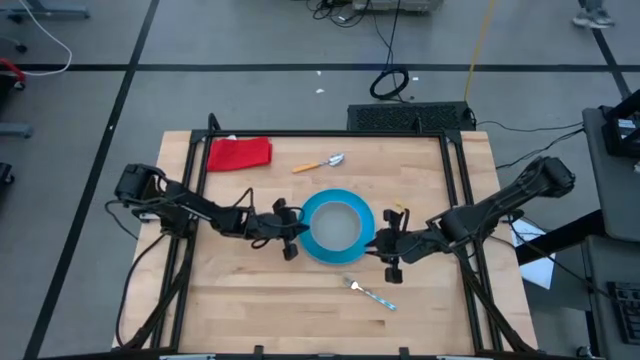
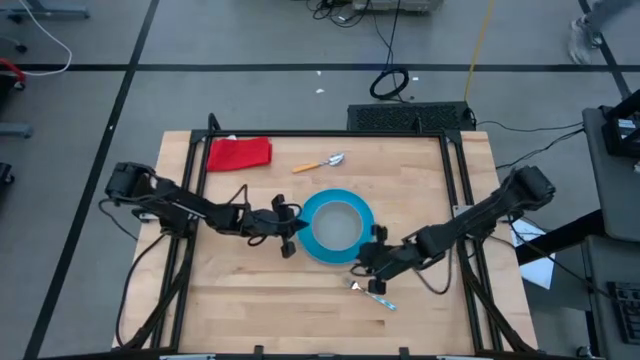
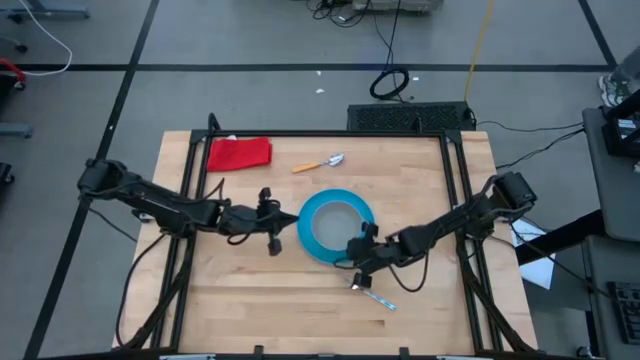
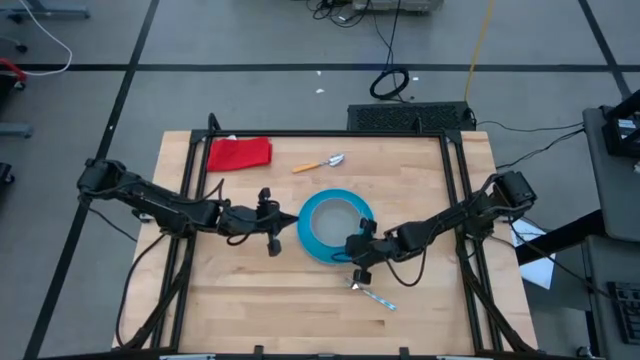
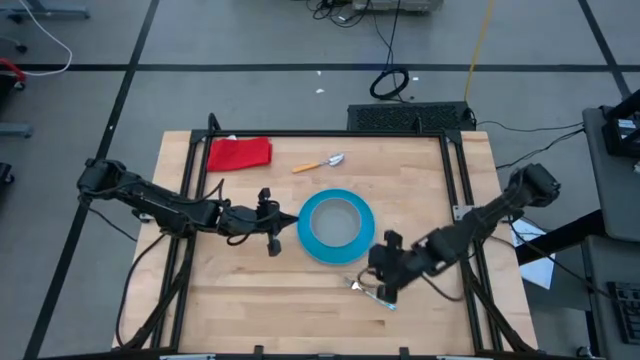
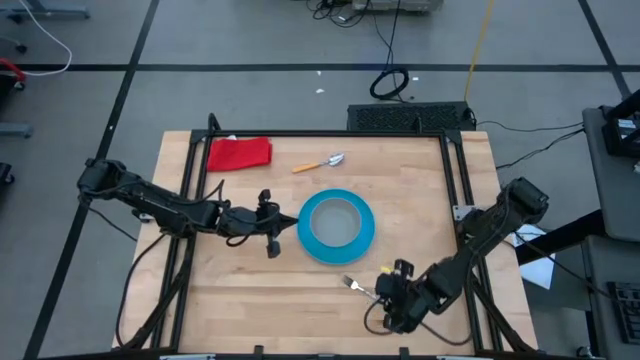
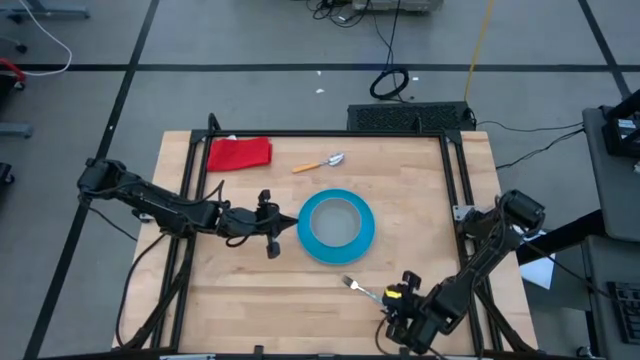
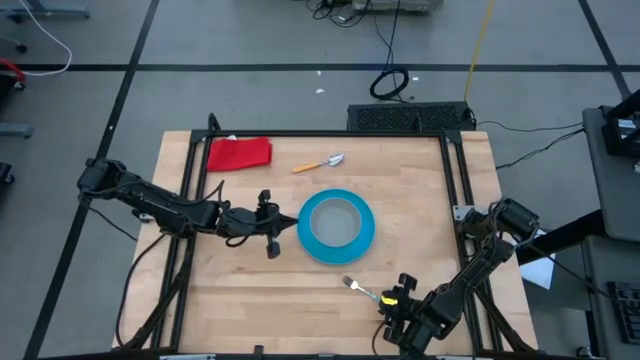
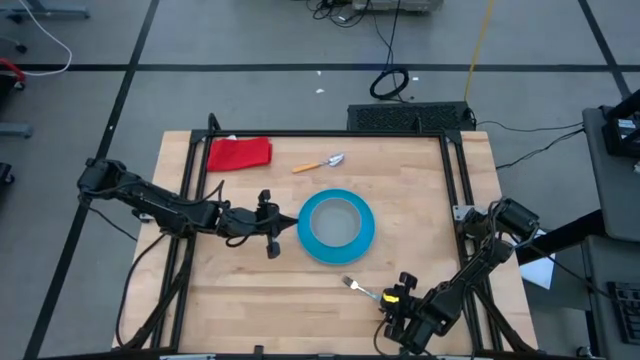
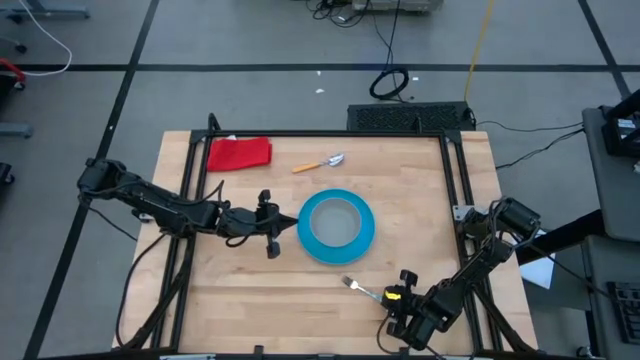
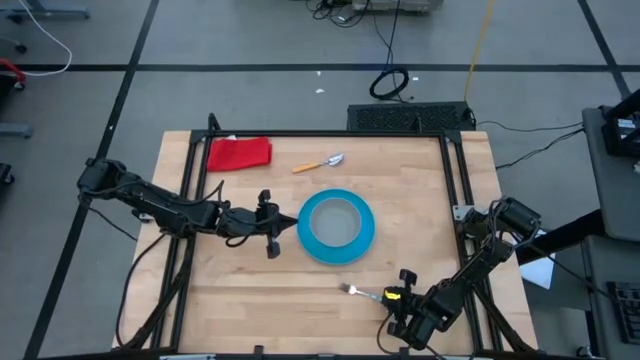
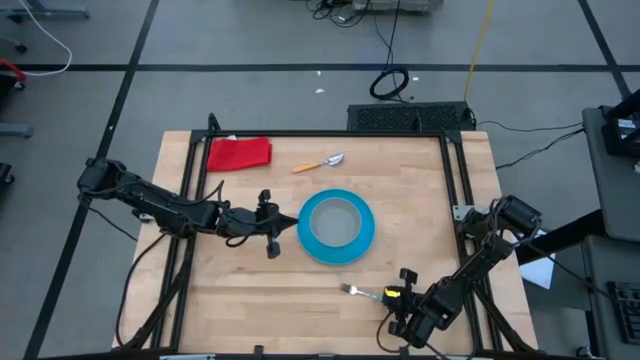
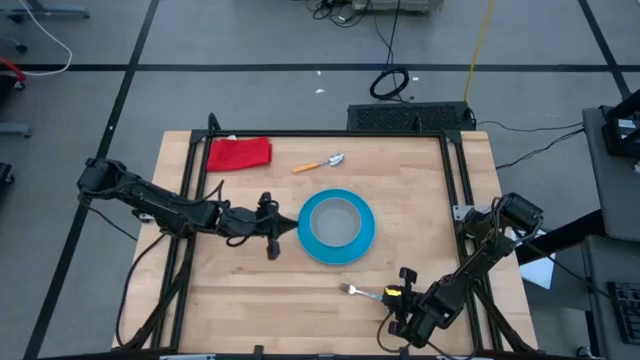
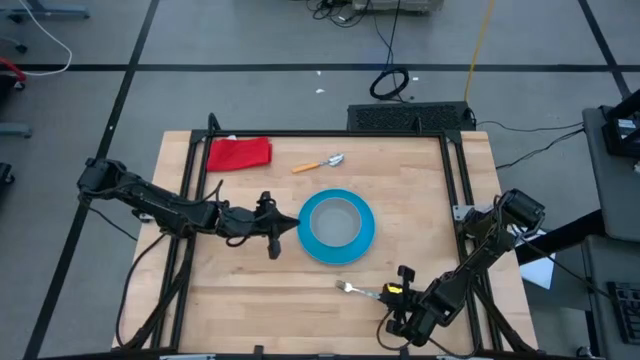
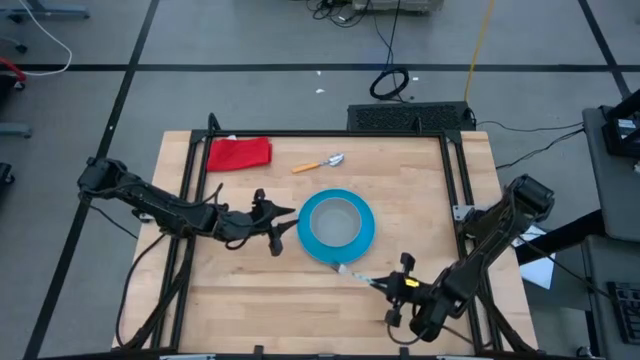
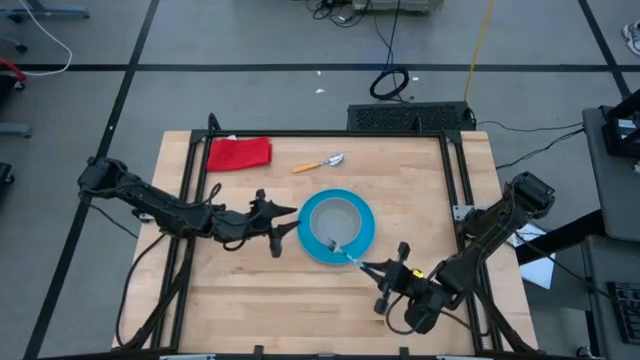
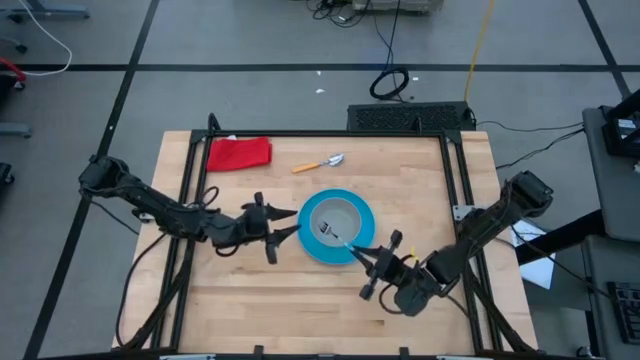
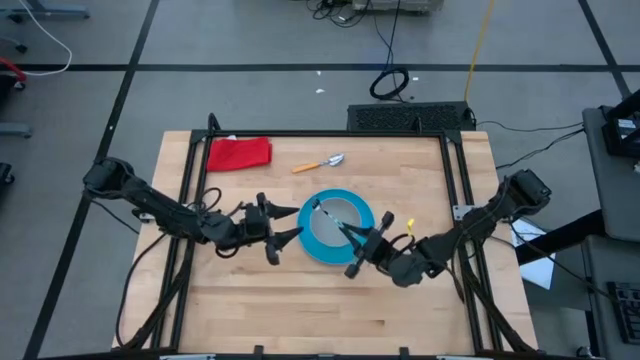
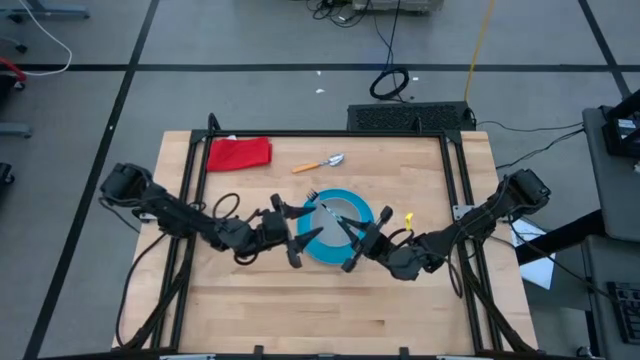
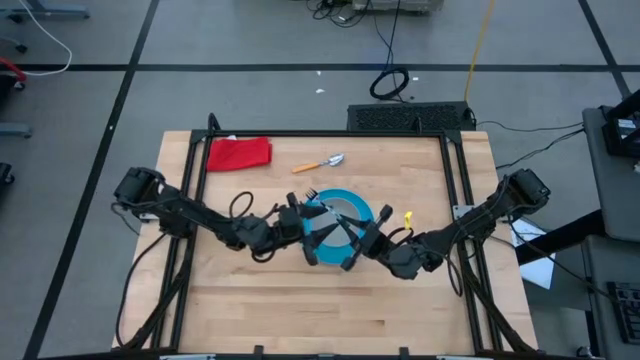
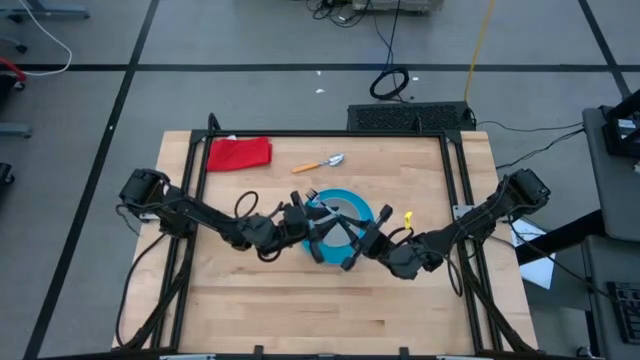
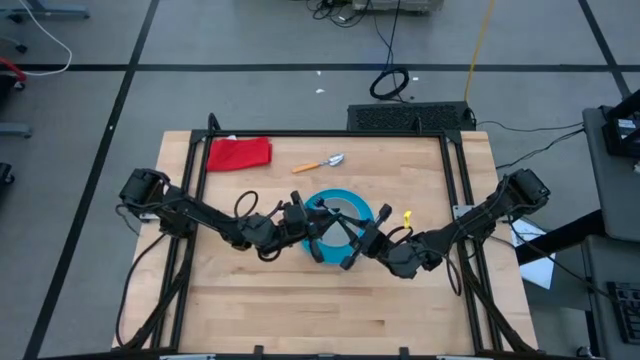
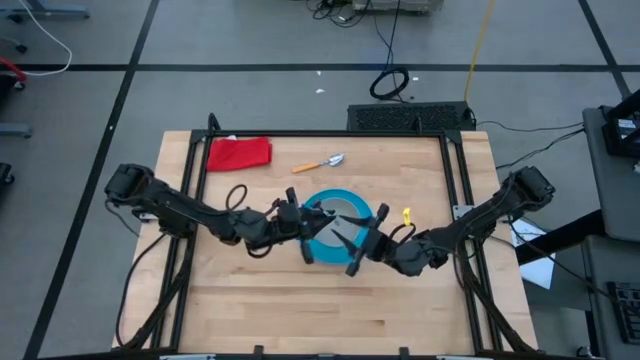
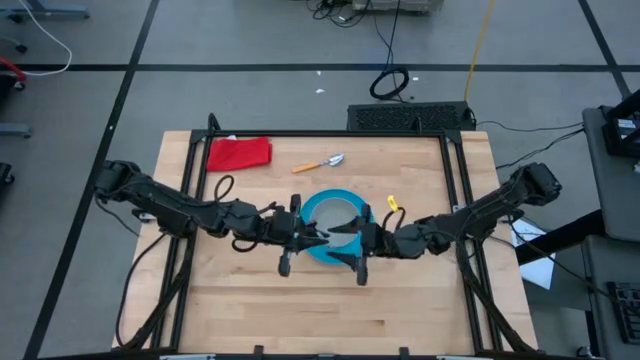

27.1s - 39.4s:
Task: Set table place
Put the blue fork to the left of the blue plate

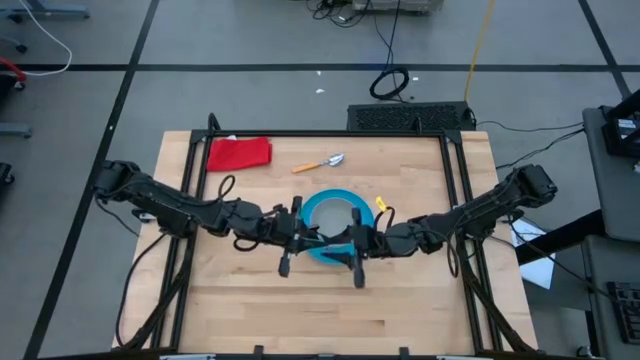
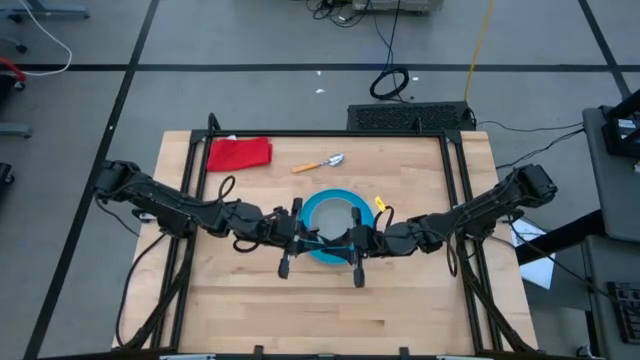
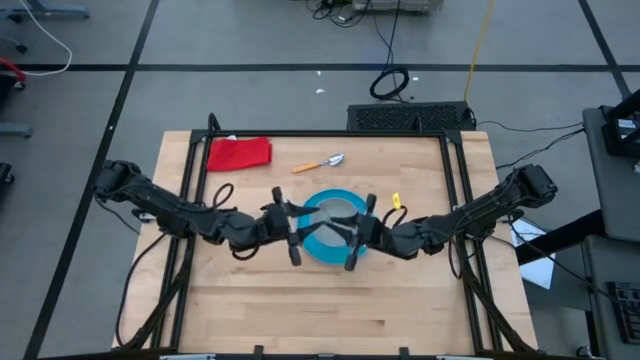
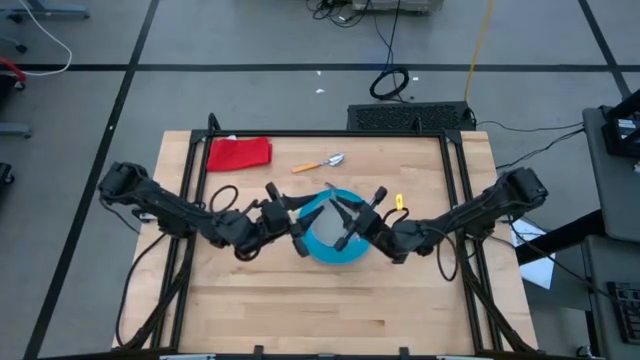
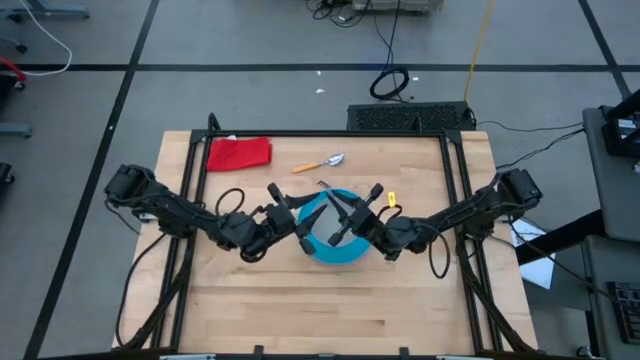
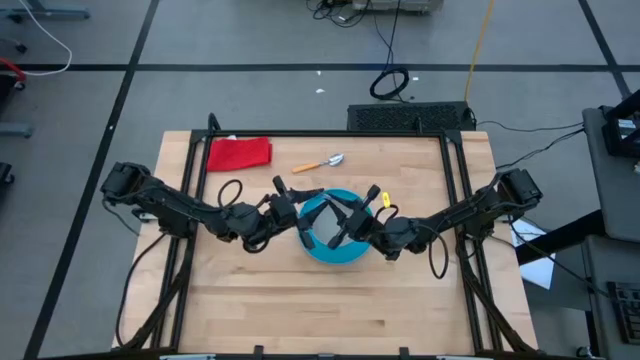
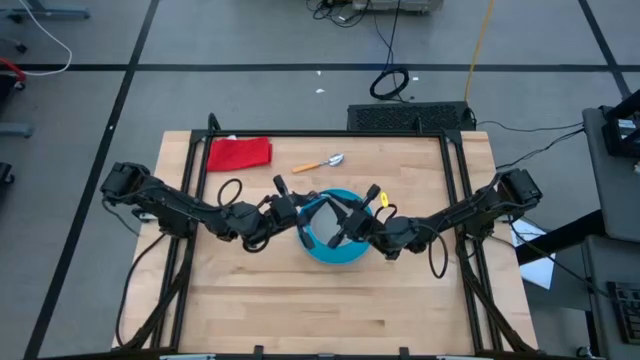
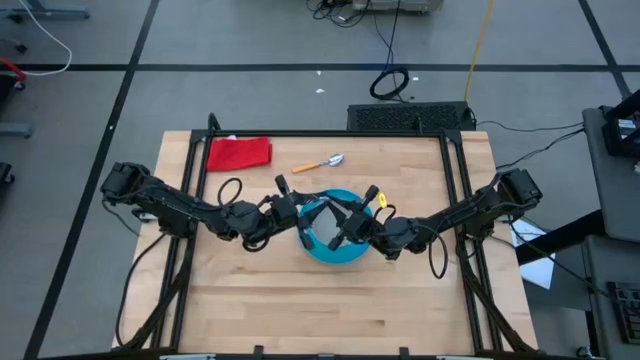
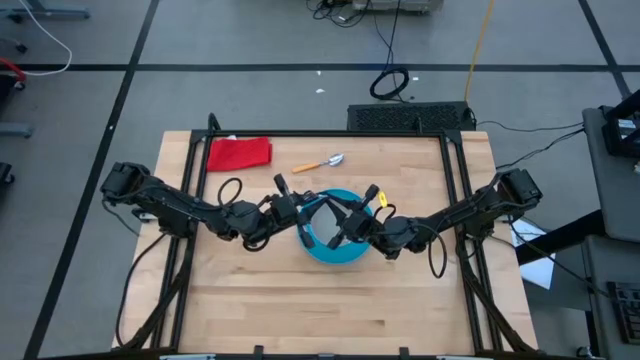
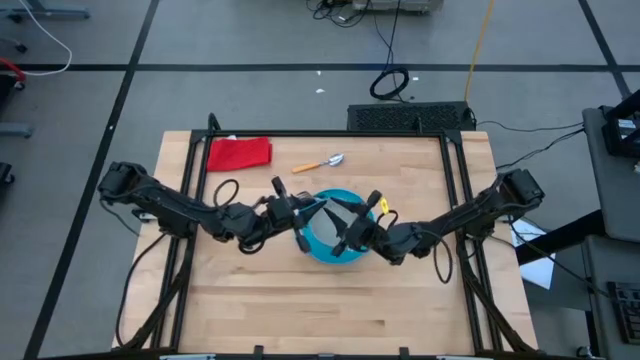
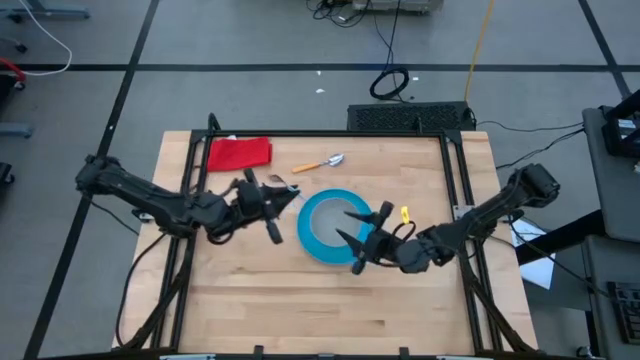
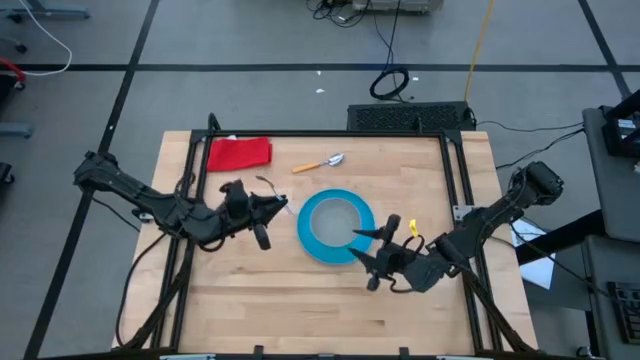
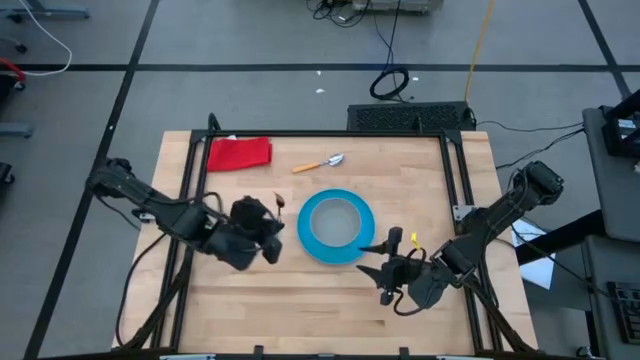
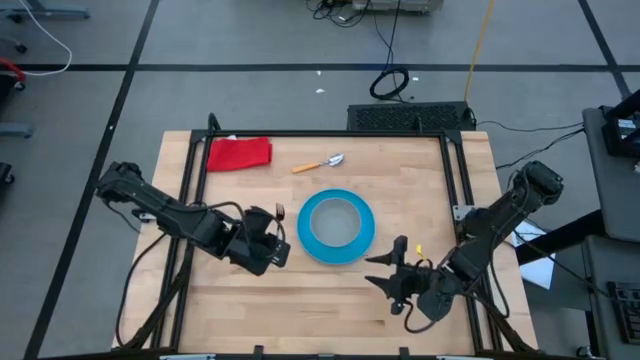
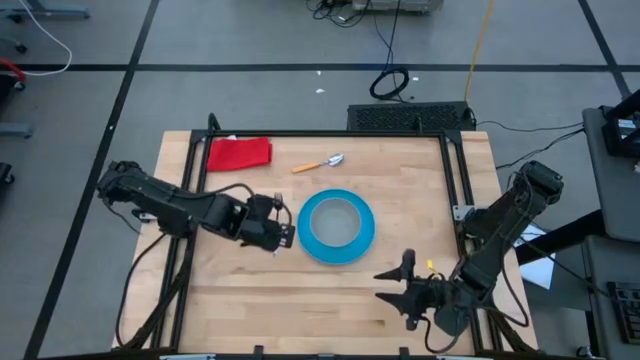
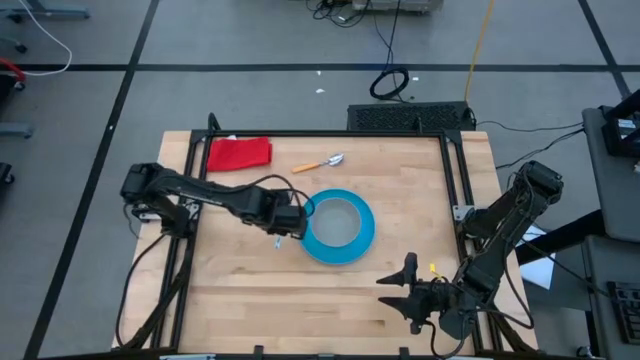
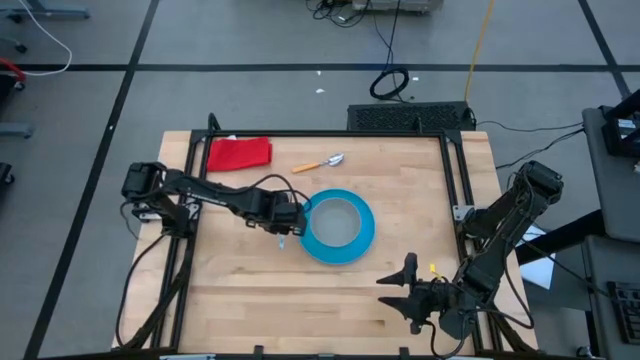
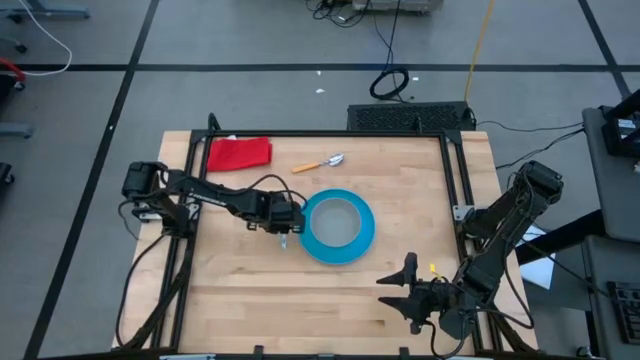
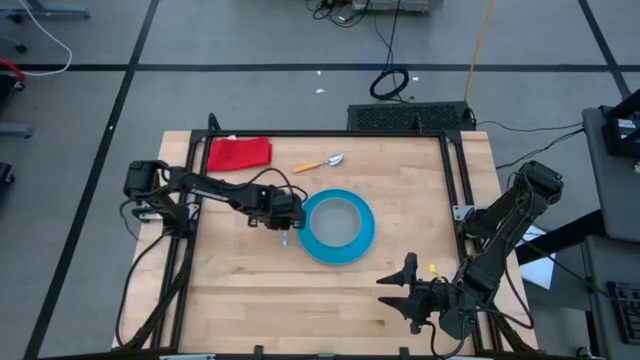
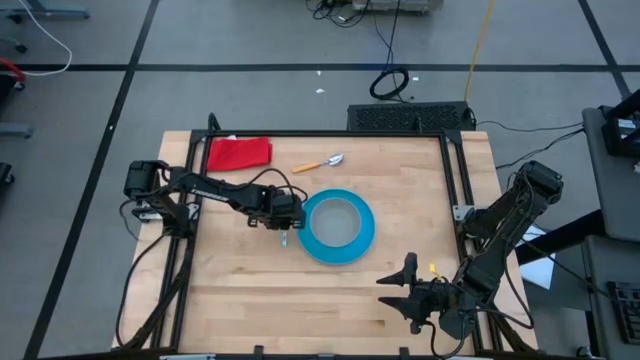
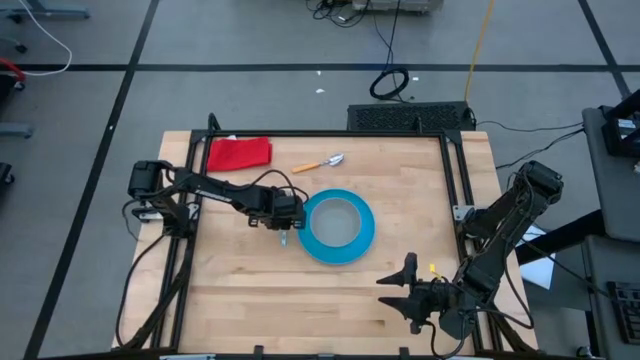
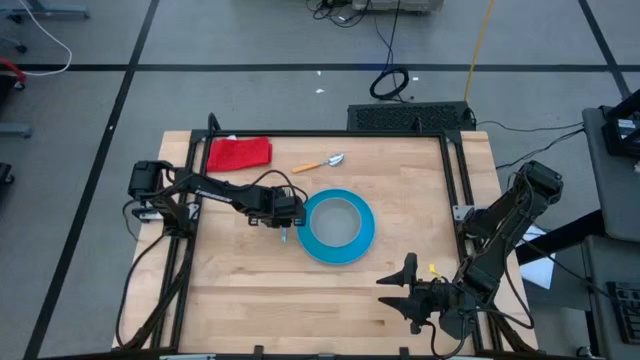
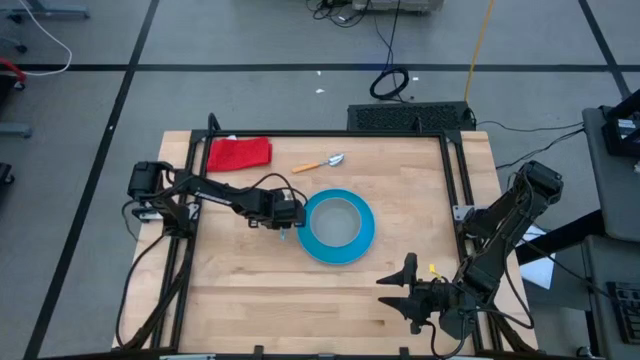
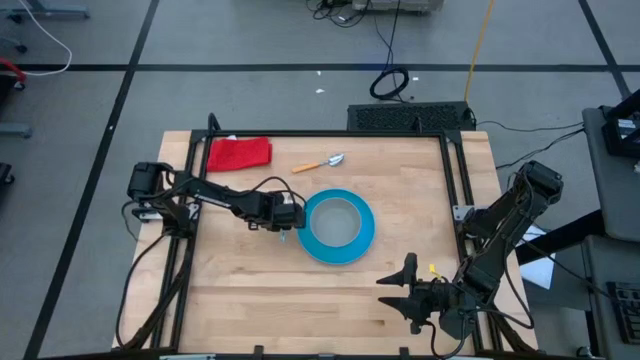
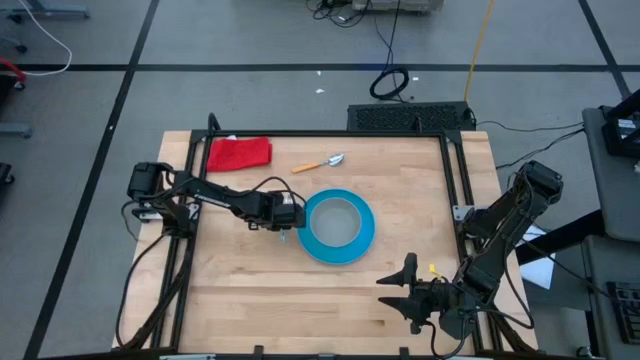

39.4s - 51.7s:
Put the blue fork to the left of the blue plate
